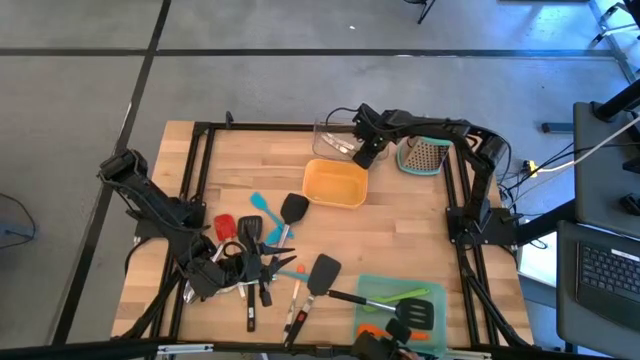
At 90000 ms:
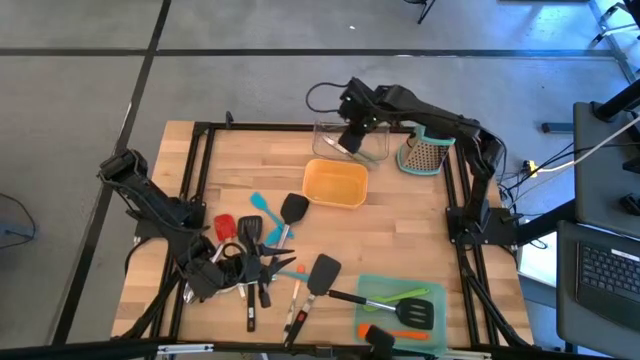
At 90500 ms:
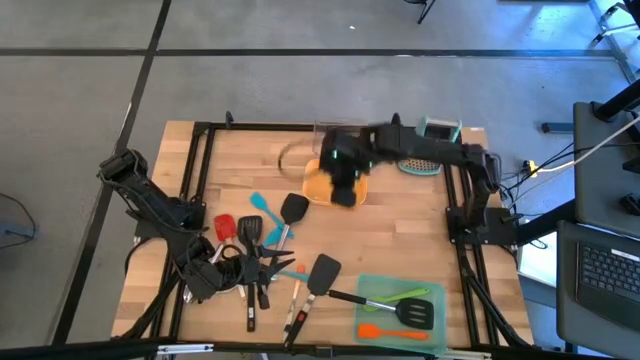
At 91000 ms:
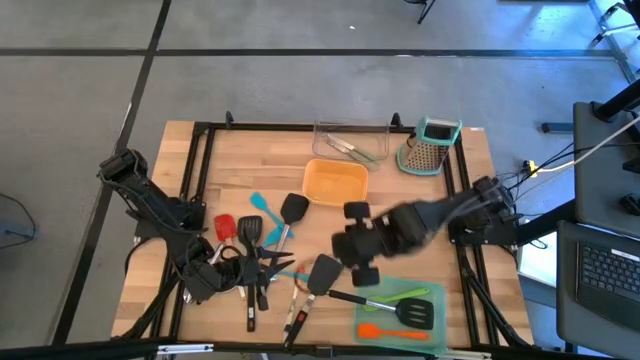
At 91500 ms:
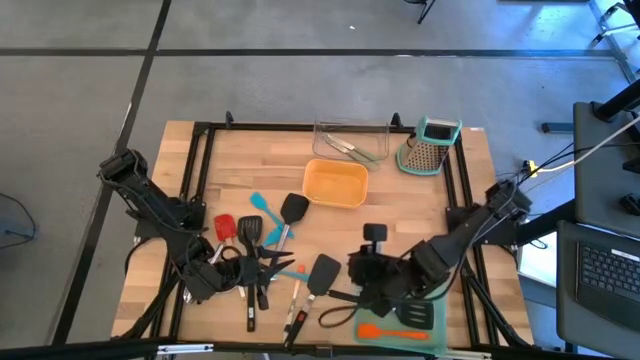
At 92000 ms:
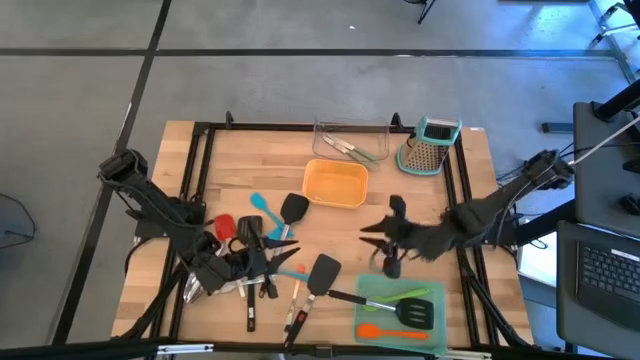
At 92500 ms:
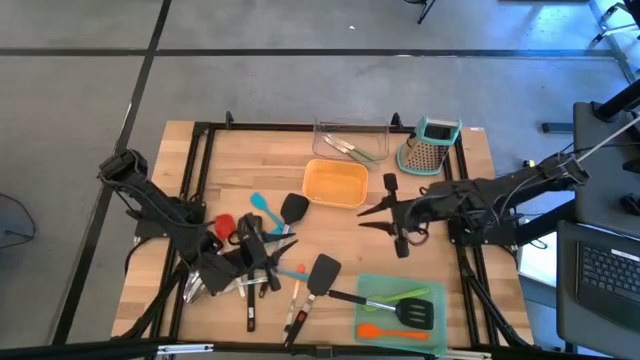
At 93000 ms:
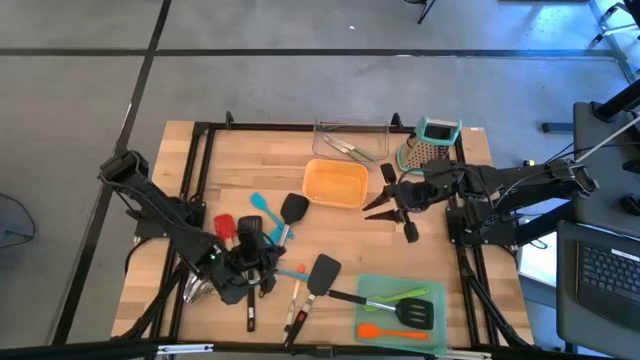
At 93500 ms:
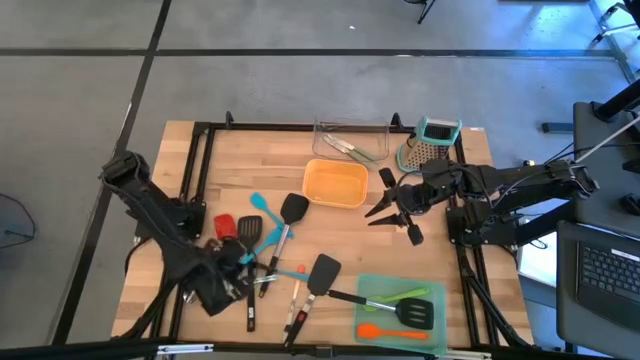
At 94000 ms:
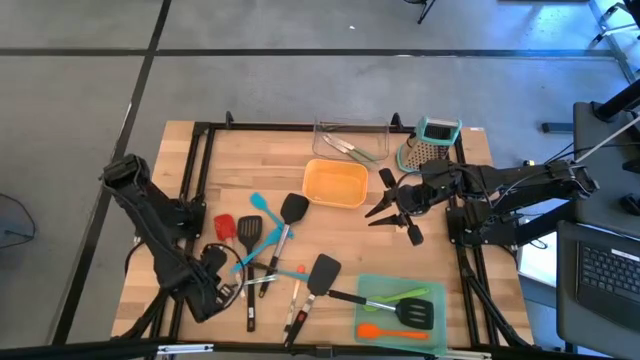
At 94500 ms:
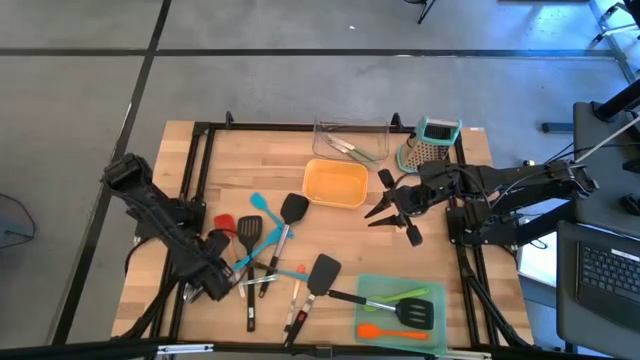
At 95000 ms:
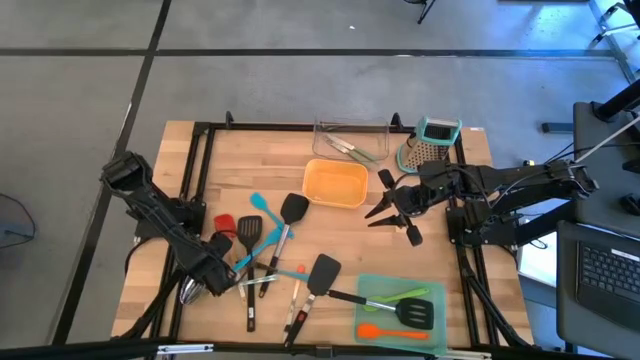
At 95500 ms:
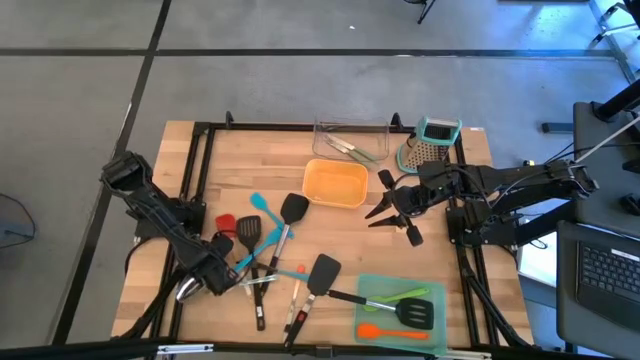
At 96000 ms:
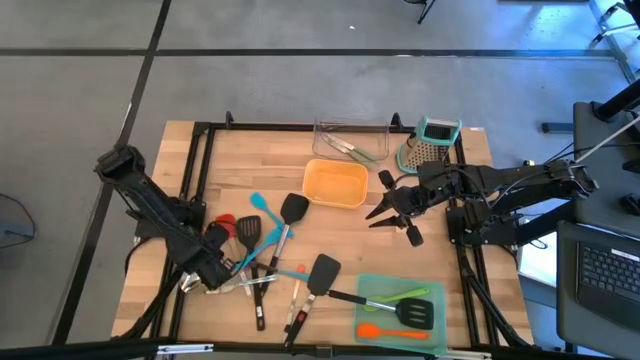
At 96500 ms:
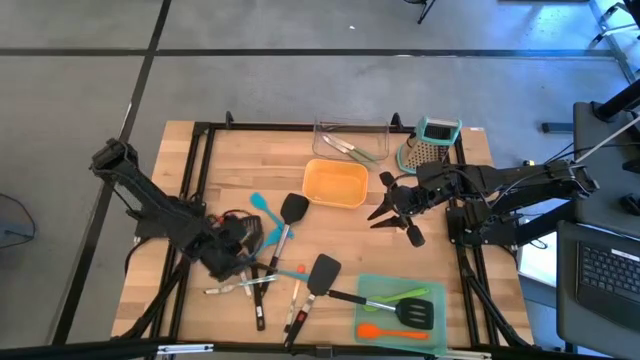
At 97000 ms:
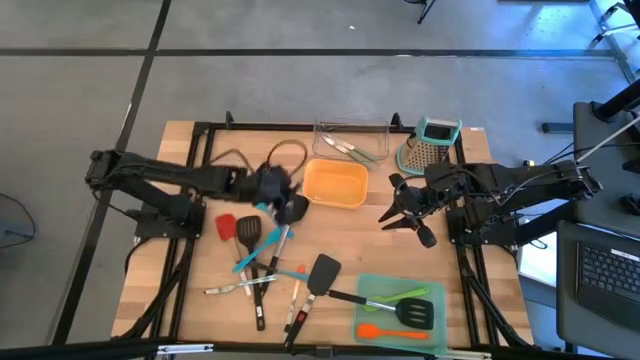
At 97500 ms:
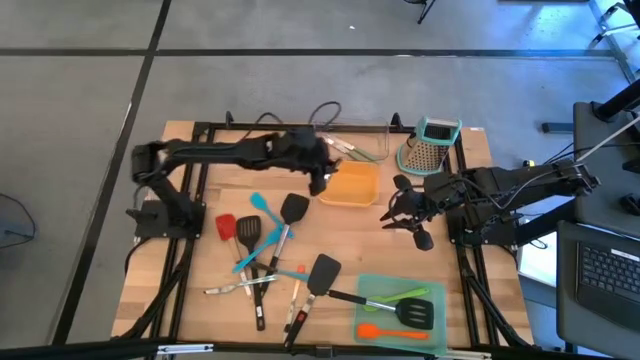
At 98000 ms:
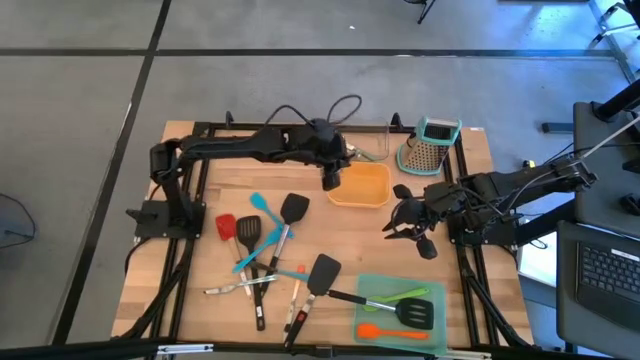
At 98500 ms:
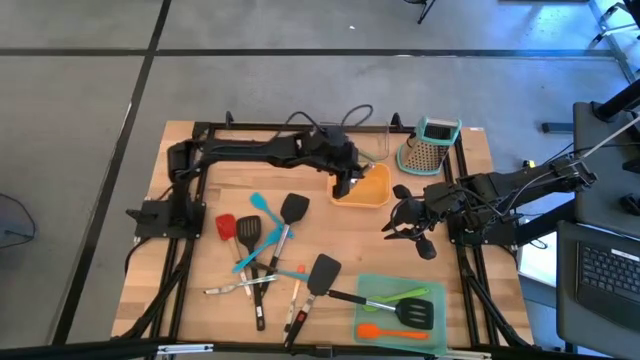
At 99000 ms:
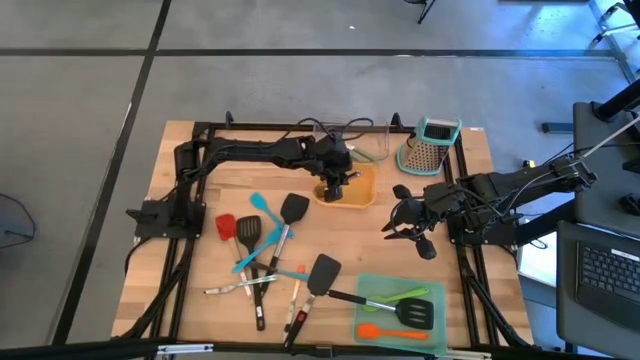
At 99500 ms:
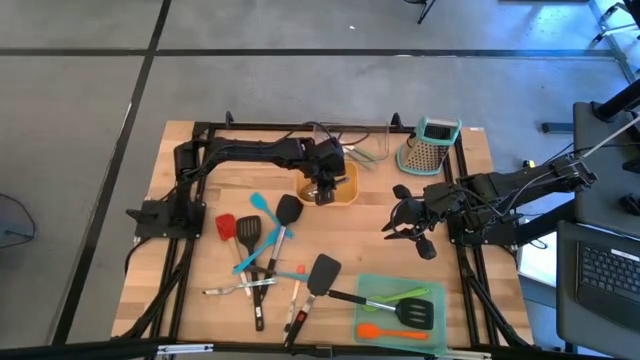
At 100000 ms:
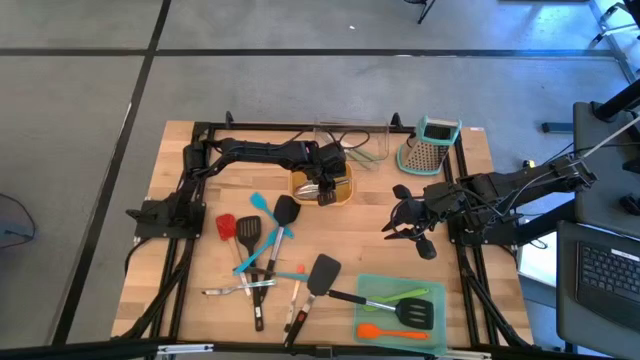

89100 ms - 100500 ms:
Task: Pick & Place Kitchen Items
Put the silver scoop into the yellow bin

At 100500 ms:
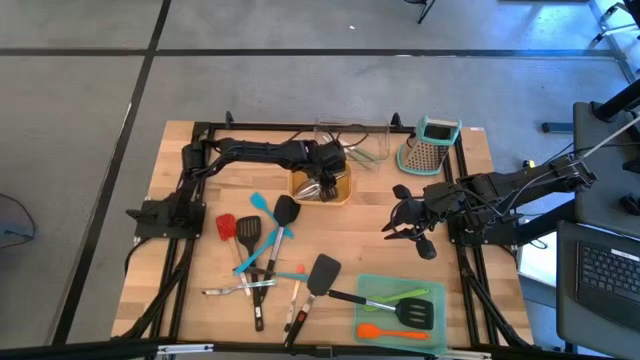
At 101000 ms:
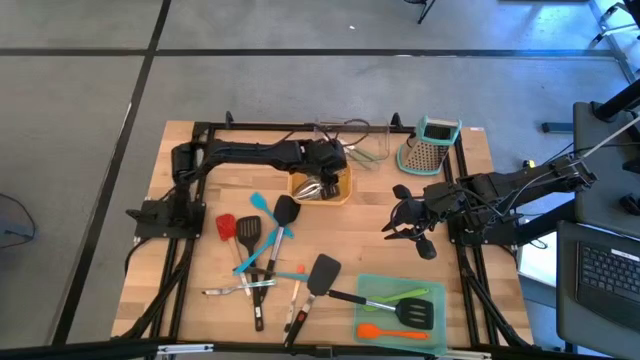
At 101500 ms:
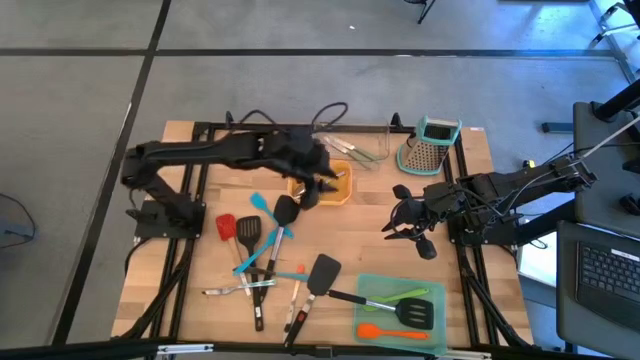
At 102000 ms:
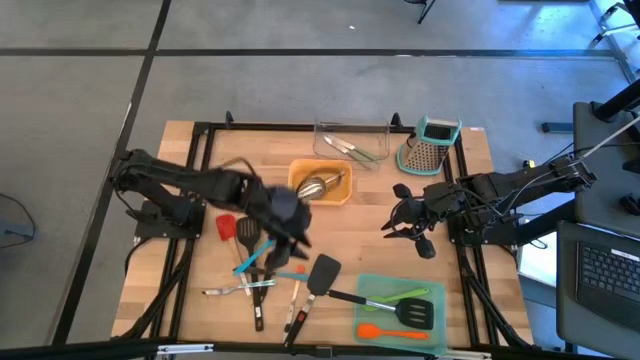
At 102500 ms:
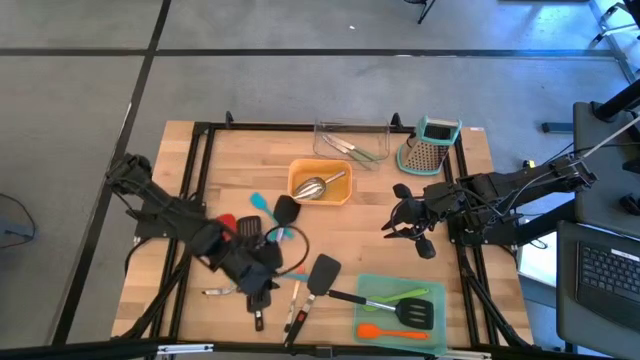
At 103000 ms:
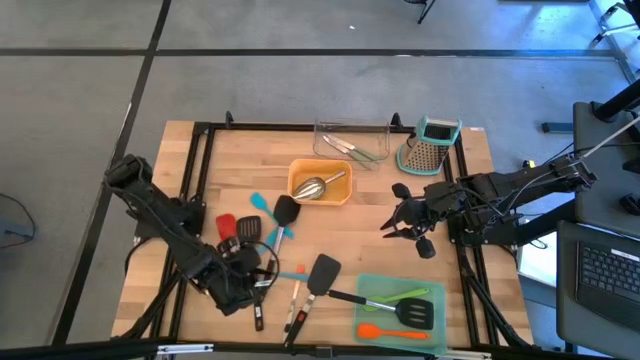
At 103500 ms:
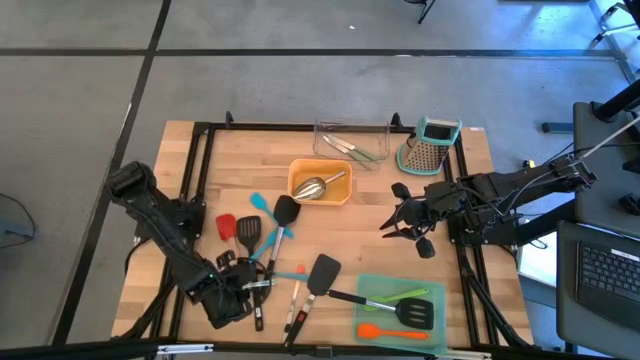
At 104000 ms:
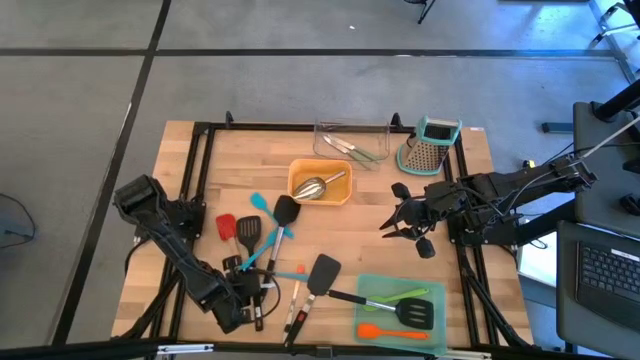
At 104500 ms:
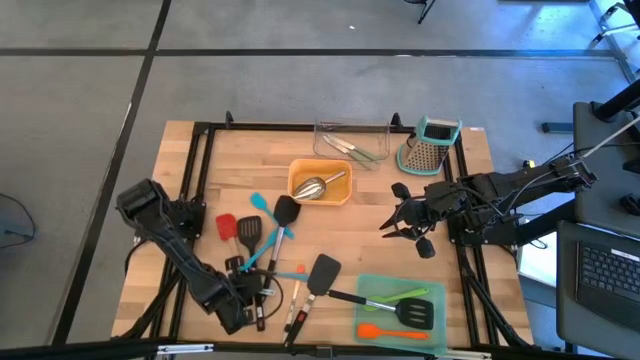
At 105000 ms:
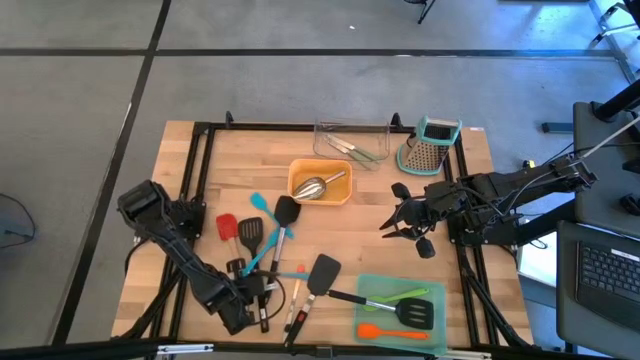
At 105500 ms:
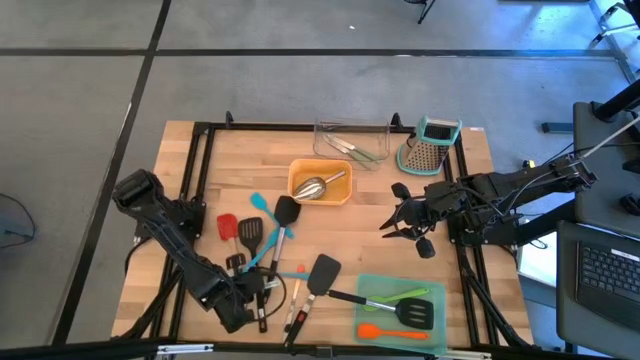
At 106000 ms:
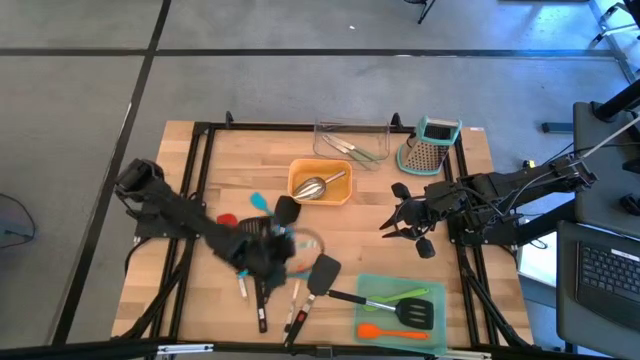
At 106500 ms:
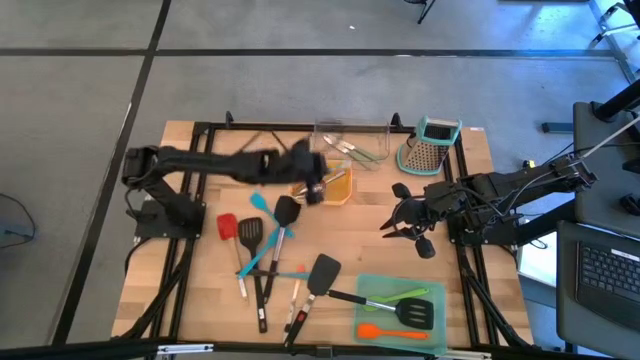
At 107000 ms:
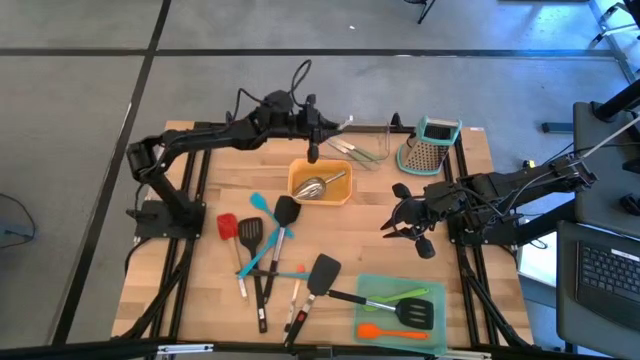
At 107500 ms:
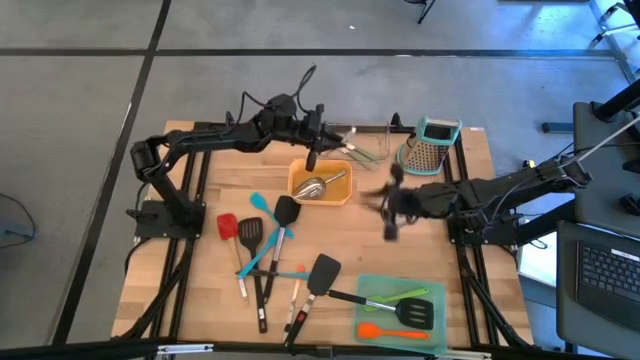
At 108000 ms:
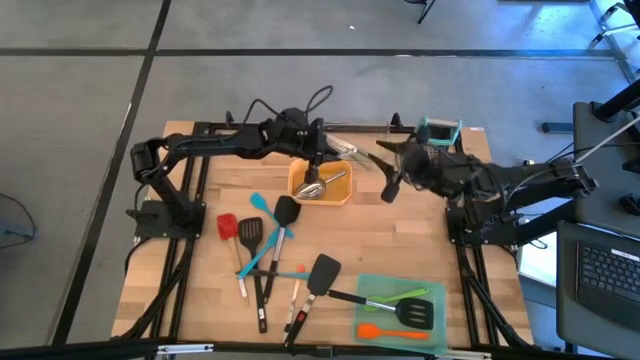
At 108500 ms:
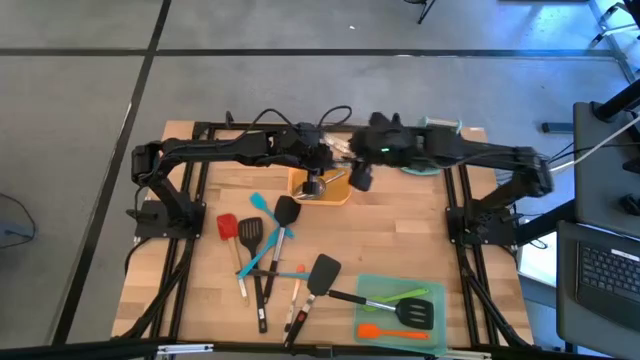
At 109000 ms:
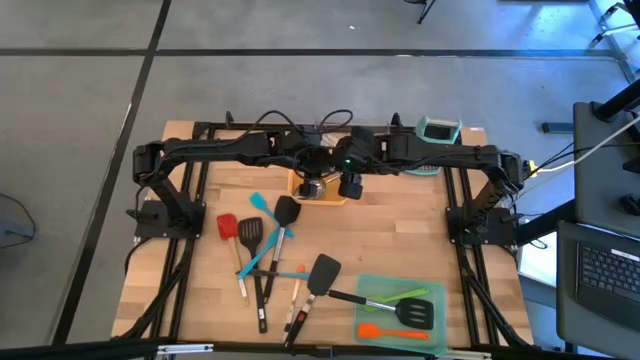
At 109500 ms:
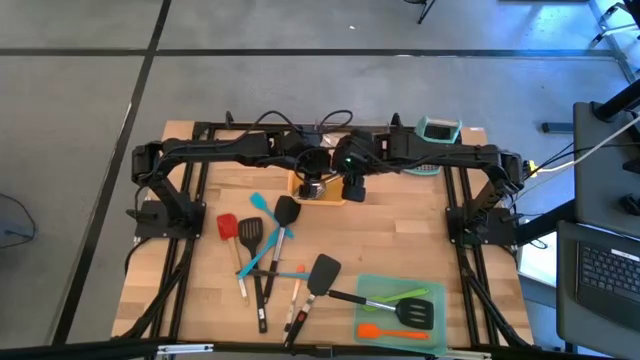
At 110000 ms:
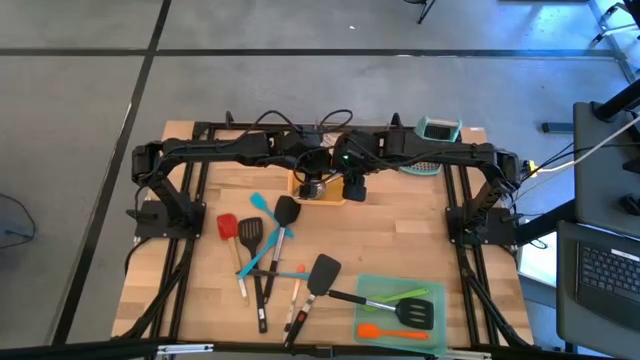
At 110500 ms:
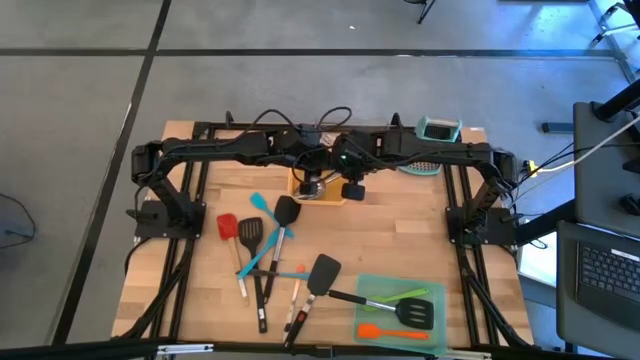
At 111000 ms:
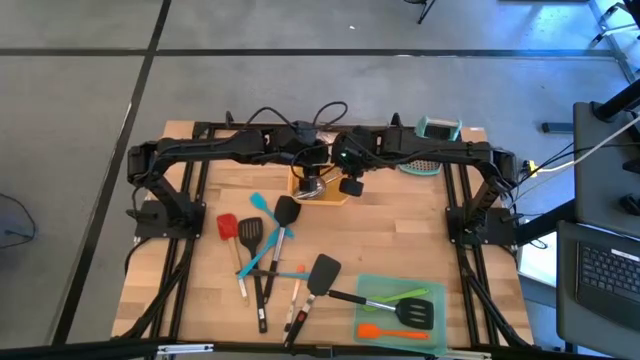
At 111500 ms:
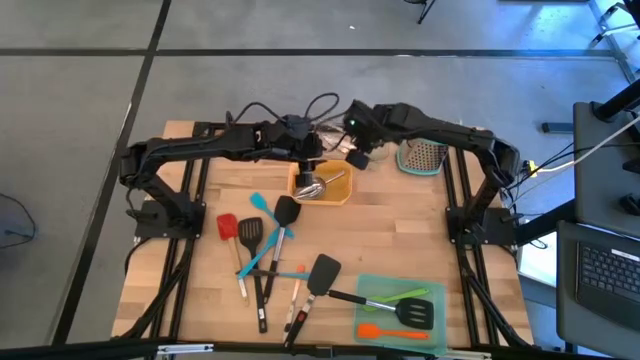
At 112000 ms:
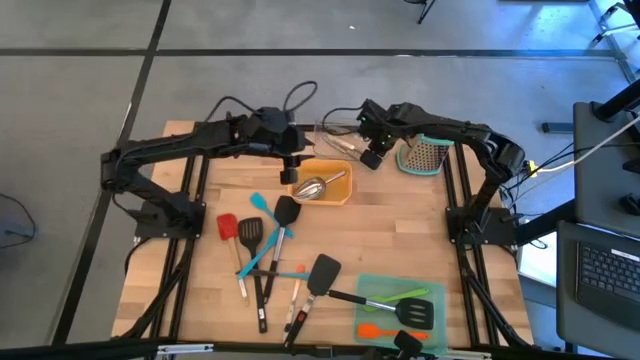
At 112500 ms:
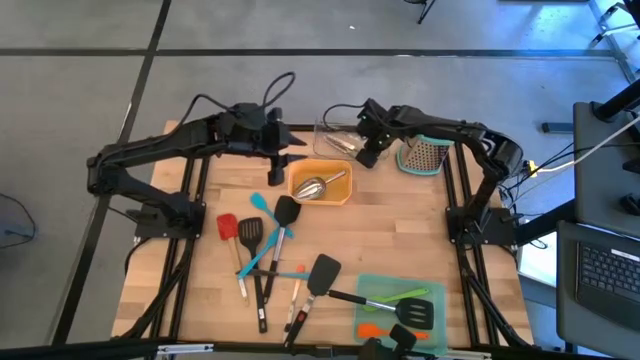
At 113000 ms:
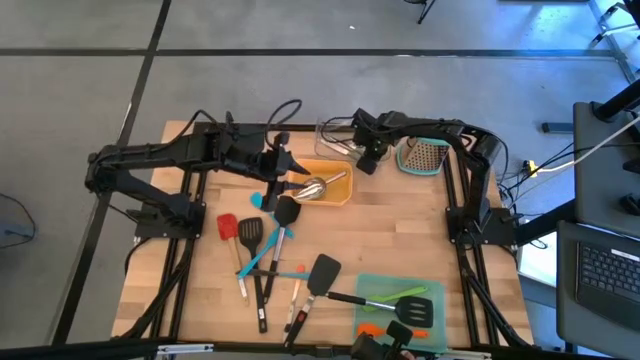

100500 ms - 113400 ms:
Put the white blue into the transparent bin
